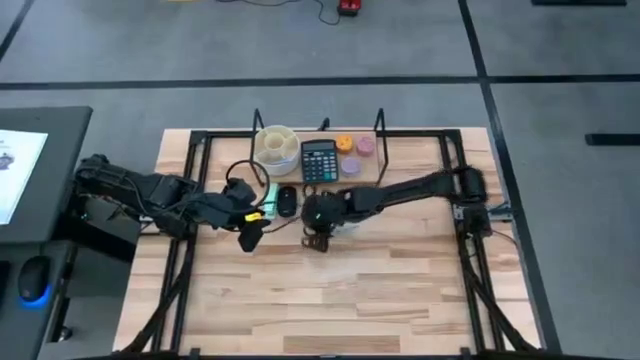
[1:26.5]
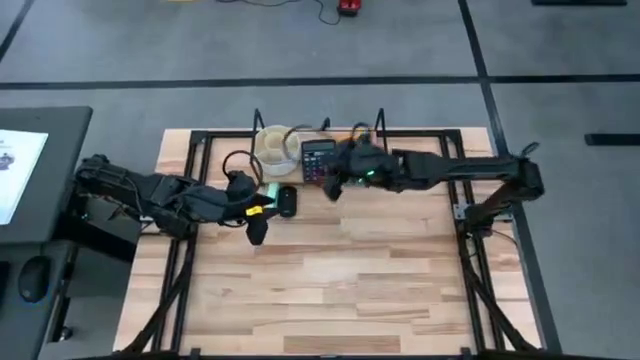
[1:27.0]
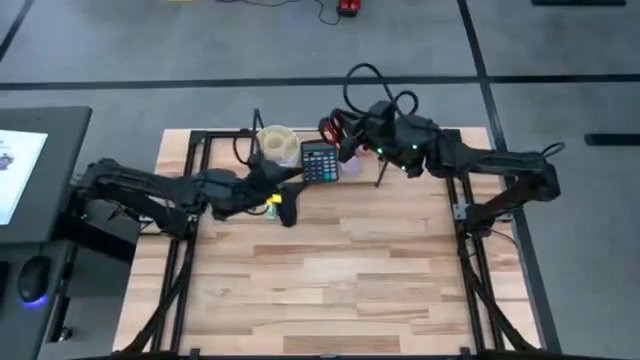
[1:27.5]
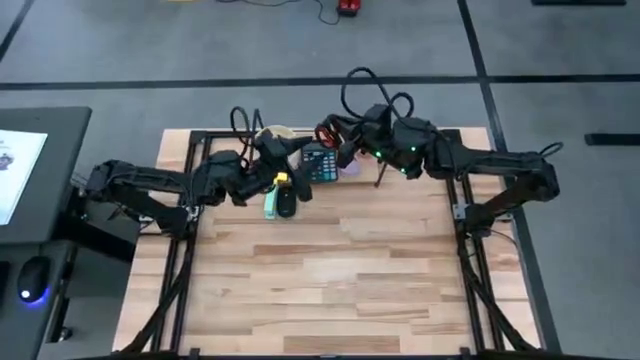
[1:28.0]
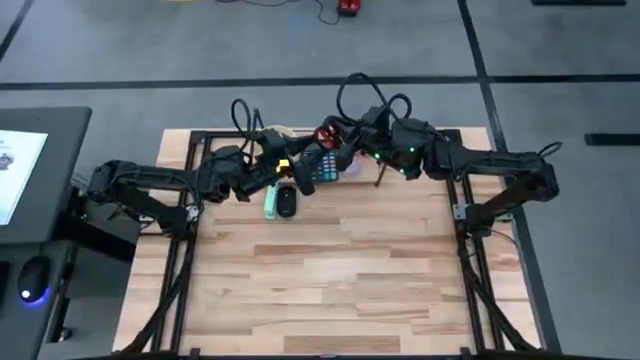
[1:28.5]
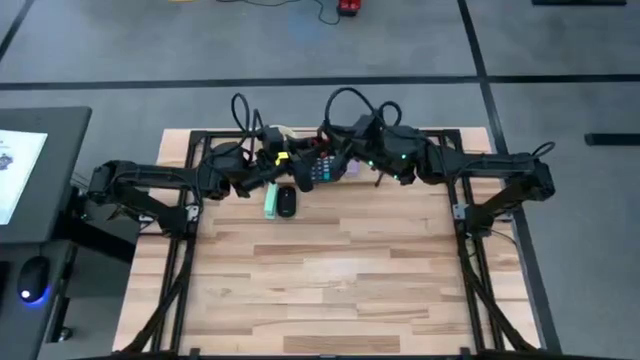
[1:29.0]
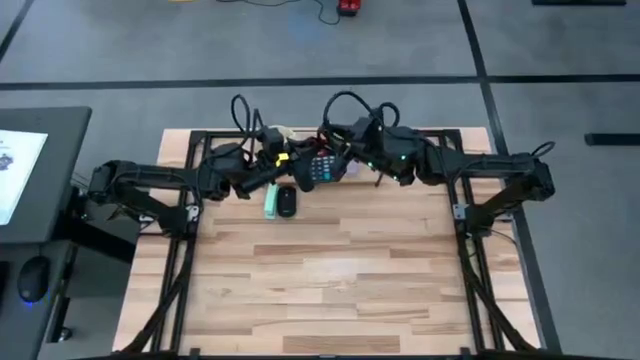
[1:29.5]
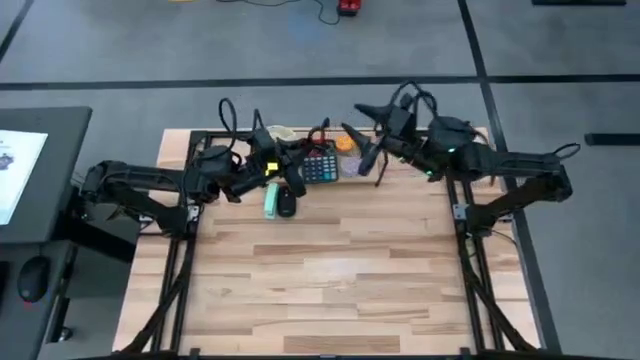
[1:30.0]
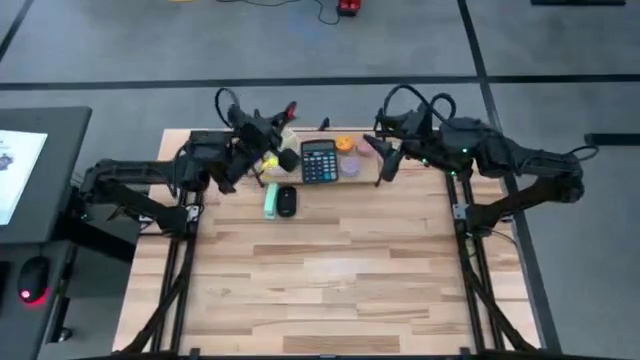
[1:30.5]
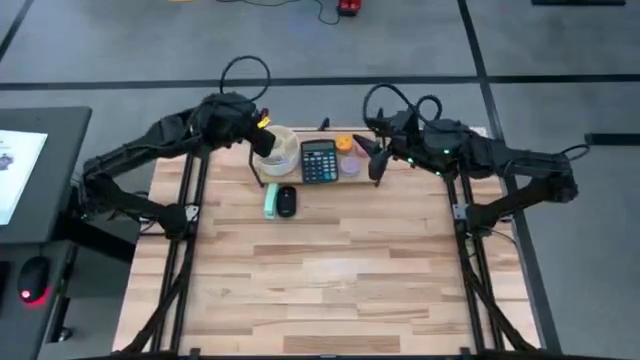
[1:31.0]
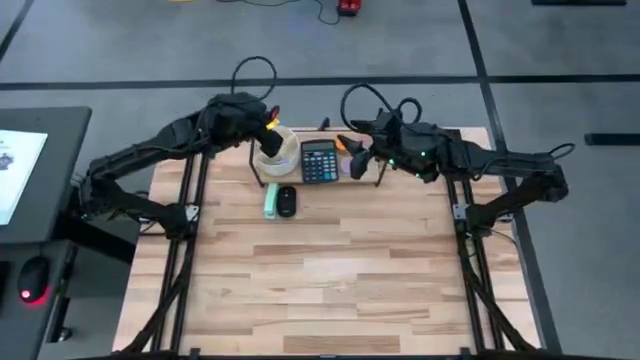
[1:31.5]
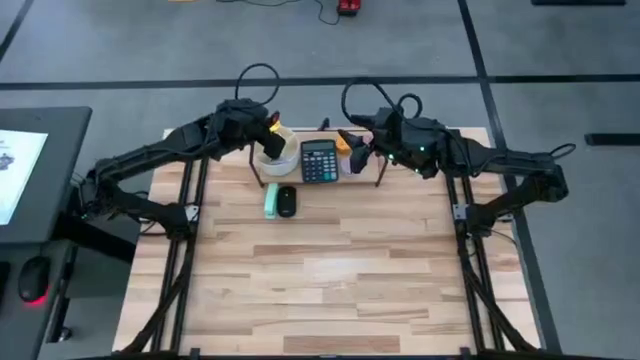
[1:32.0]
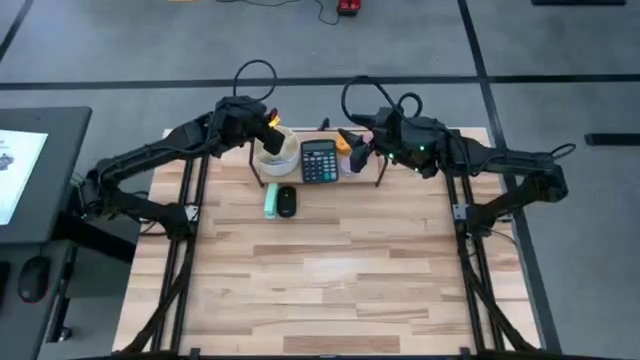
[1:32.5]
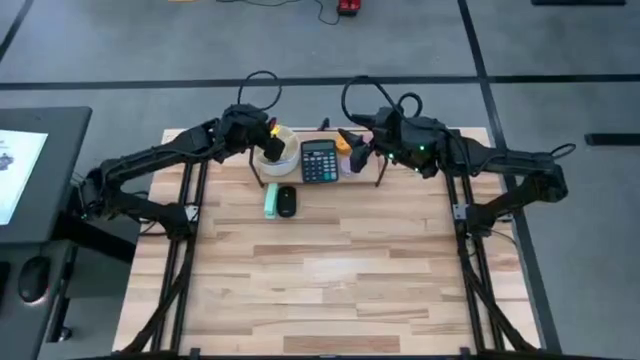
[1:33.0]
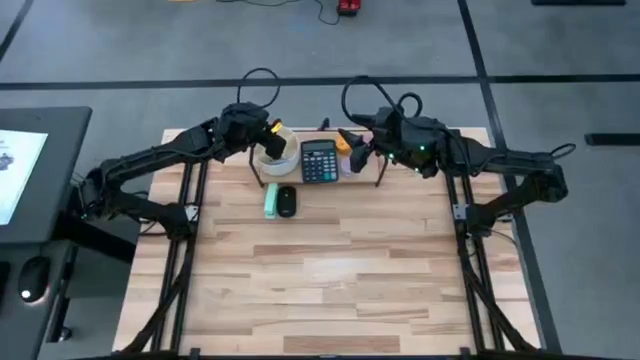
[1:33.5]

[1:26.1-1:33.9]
Task: Stock shelves
Put the black scissors into the white pen organizer on the shelf

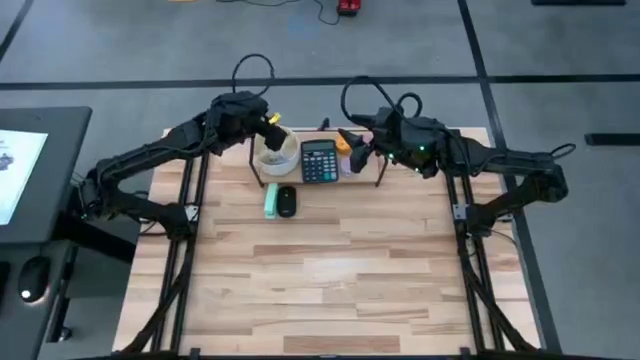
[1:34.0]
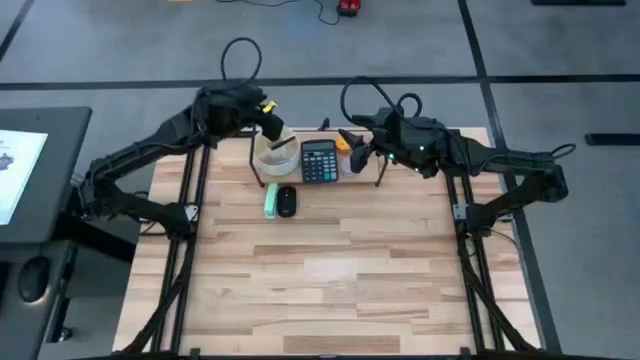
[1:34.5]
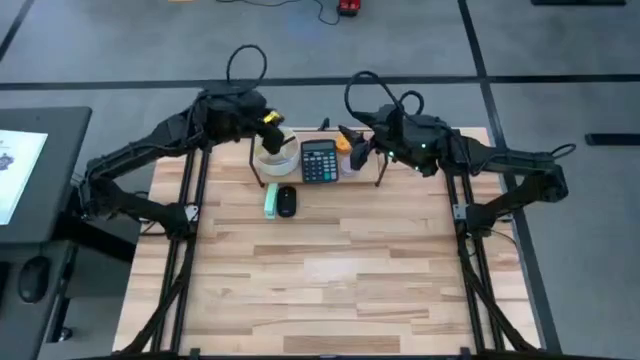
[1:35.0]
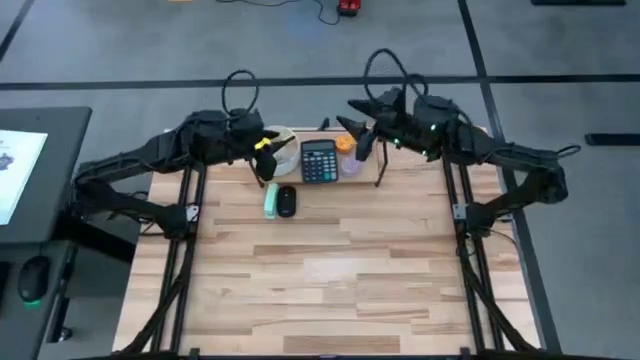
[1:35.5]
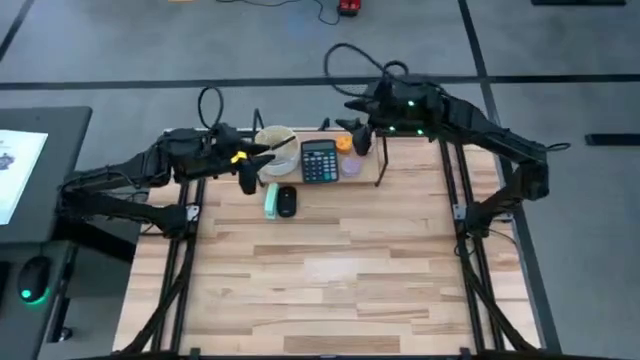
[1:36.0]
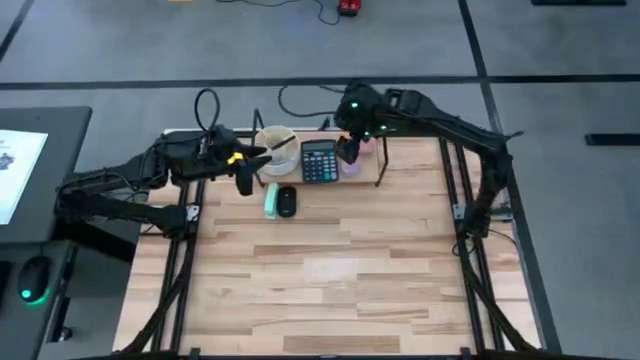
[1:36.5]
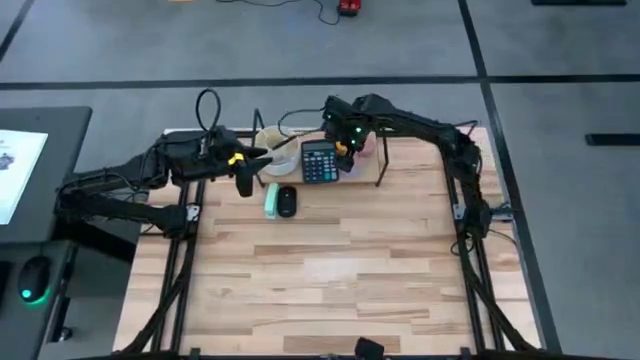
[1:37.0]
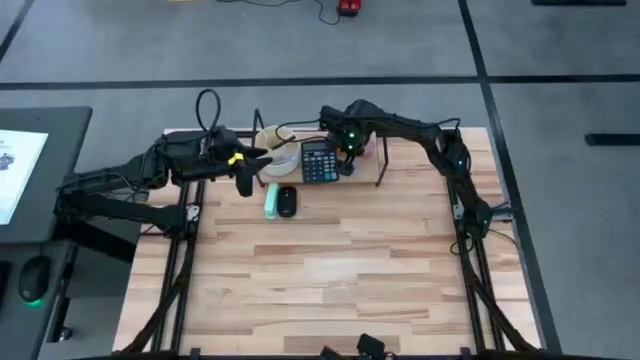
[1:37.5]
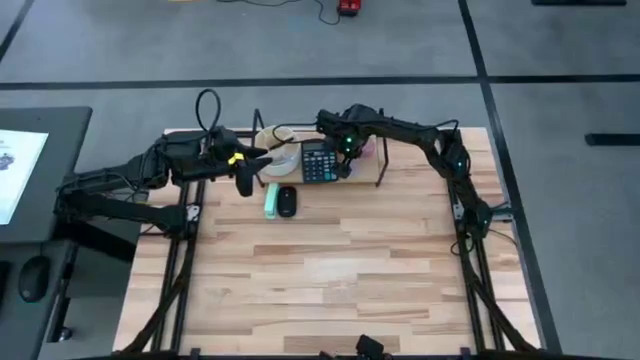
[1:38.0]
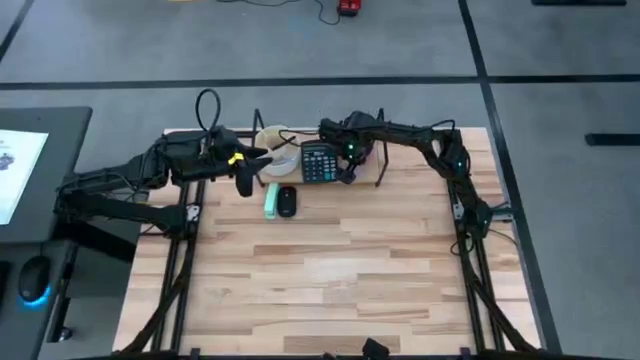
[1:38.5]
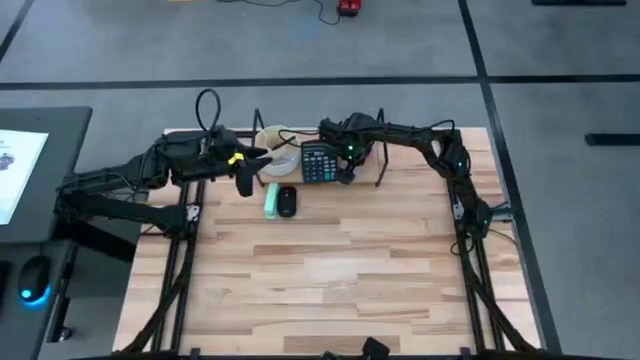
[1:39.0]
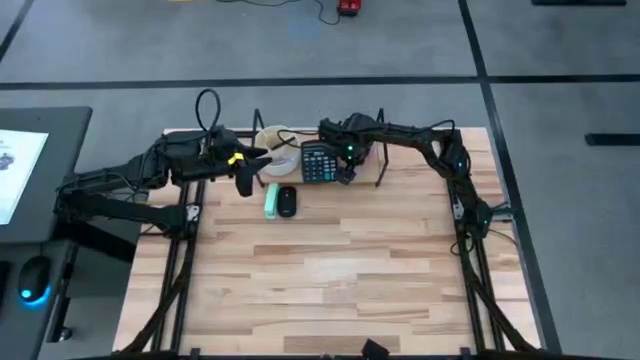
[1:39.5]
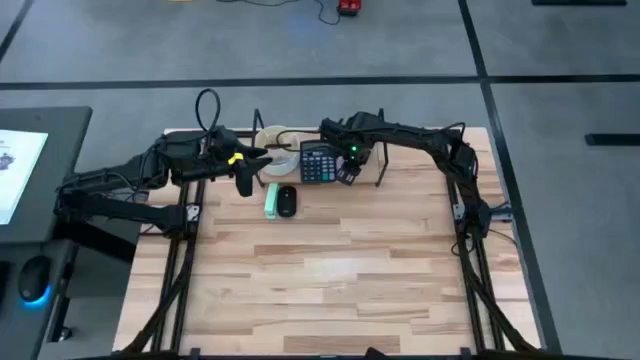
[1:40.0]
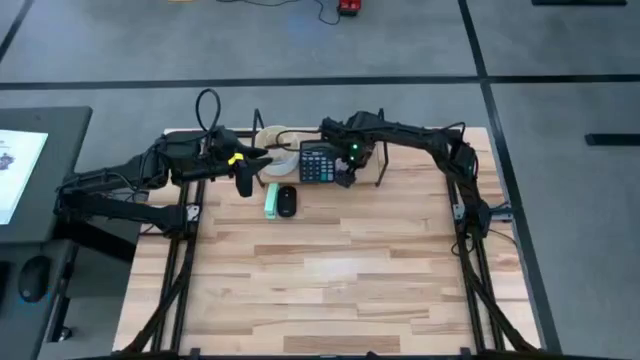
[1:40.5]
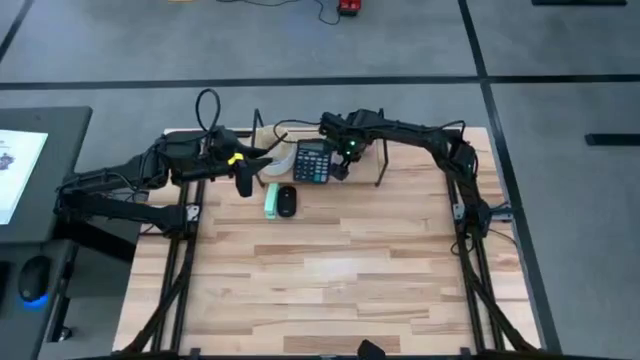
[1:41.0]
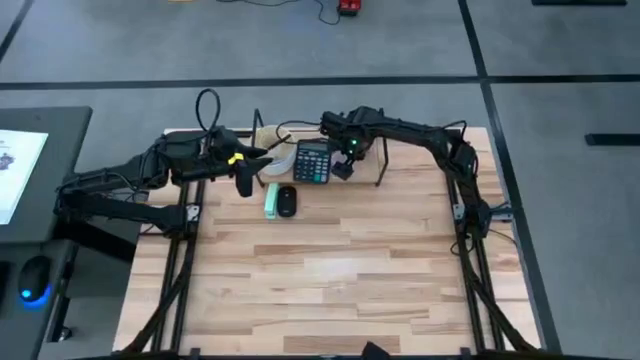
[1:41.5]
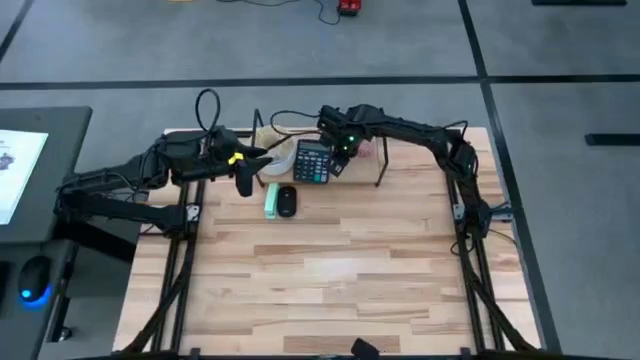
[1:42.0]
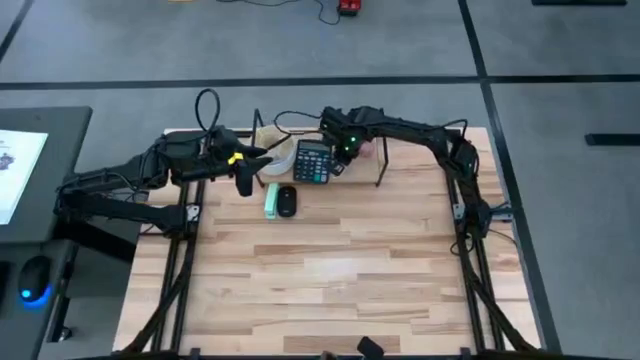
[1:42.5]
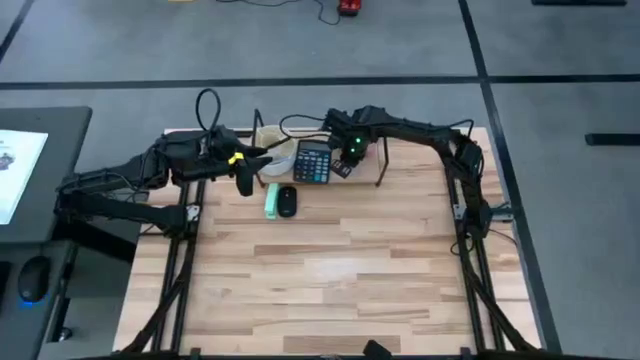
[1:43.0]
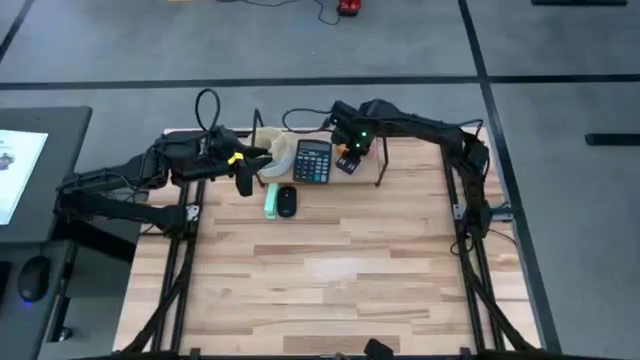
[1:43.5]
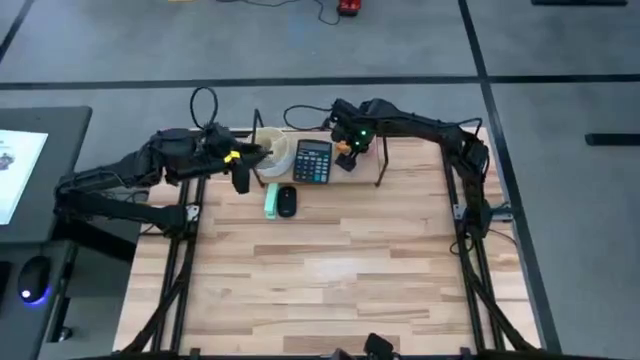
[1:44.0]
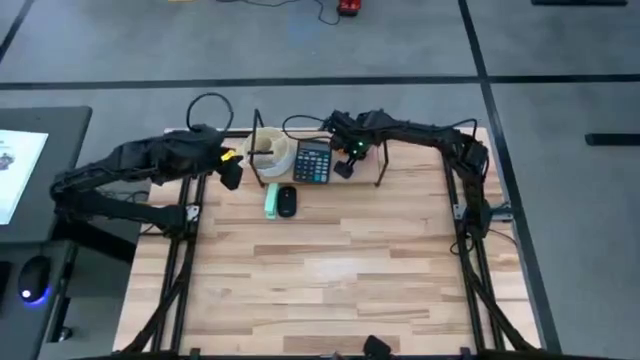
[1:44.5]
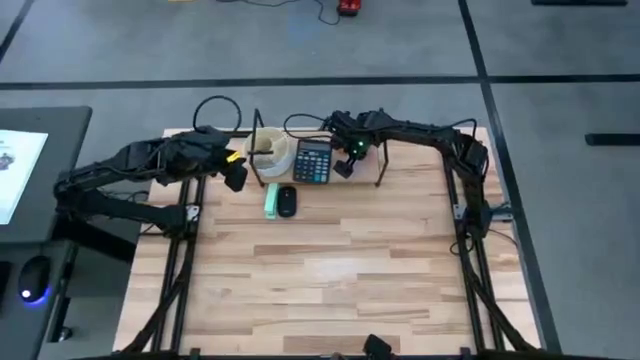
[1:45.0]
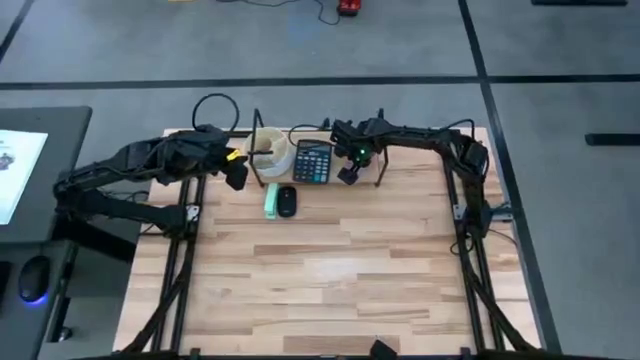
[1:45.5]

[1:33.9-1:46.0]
Remove the purple scented candle from the shelf

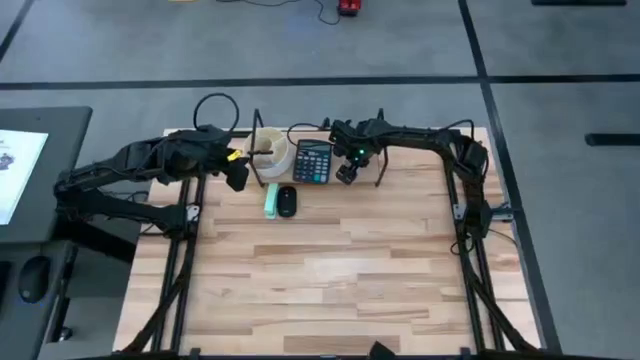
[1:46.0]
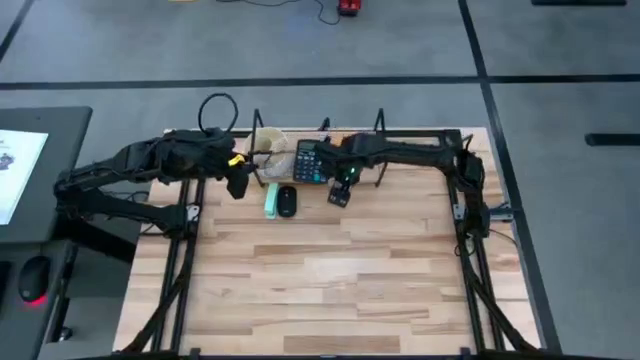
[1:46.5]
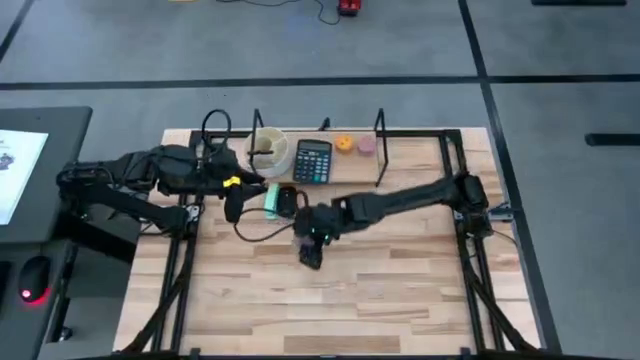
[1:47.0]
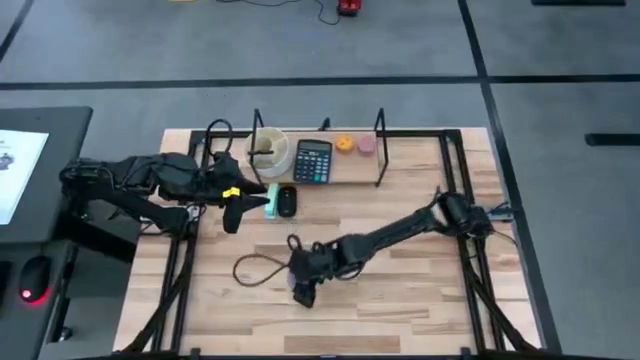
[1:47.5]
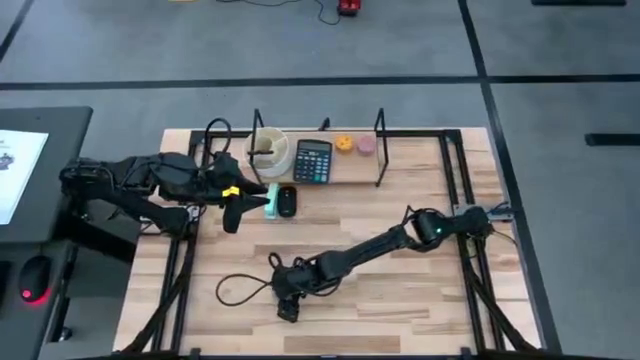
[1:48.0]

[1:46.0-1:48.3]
Remove the purple scented candle from the shelf
